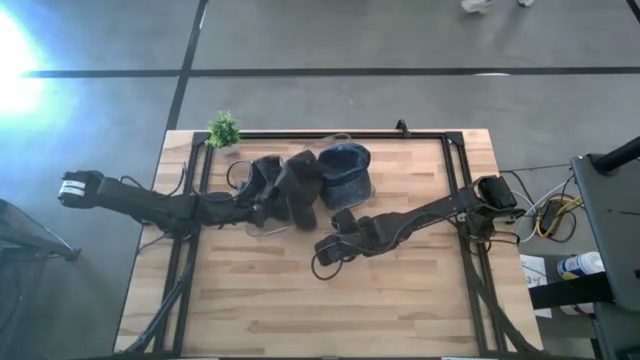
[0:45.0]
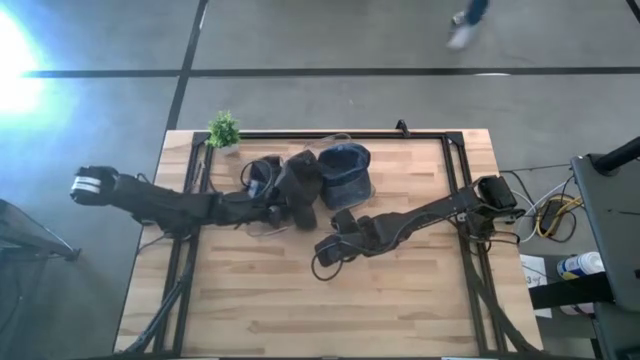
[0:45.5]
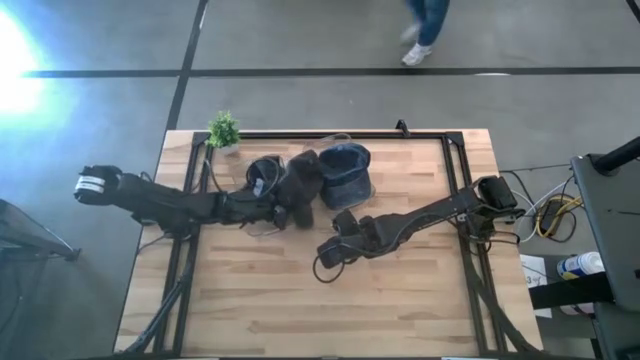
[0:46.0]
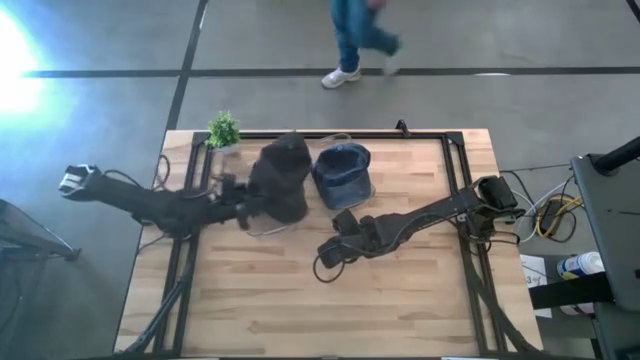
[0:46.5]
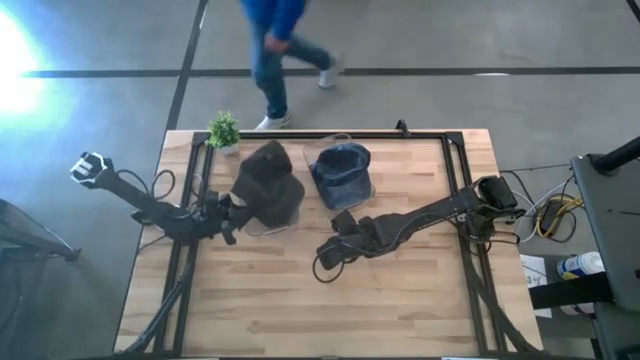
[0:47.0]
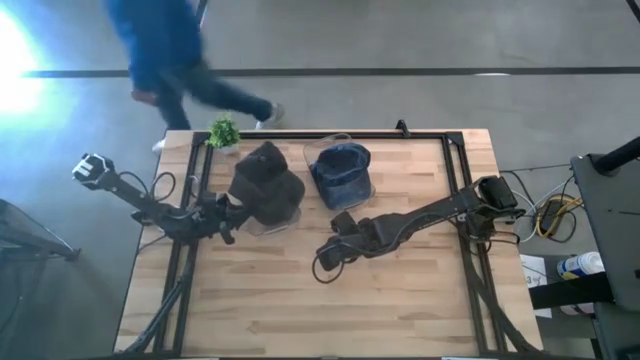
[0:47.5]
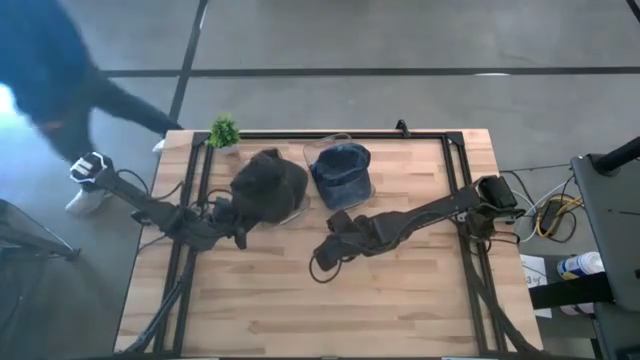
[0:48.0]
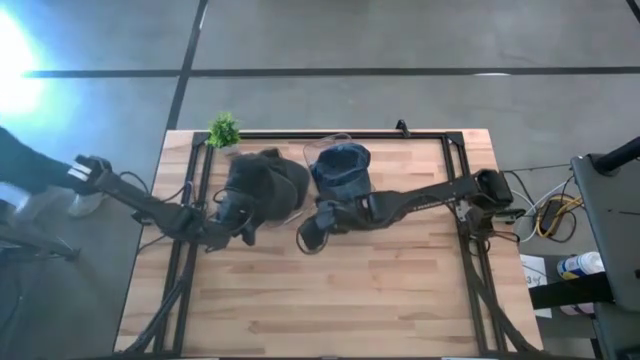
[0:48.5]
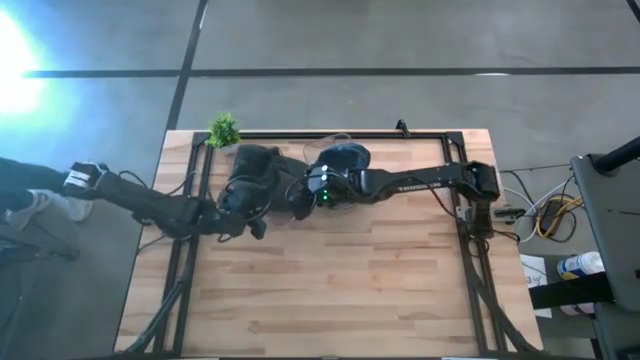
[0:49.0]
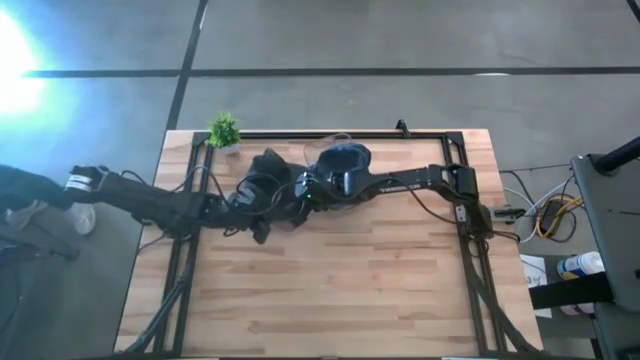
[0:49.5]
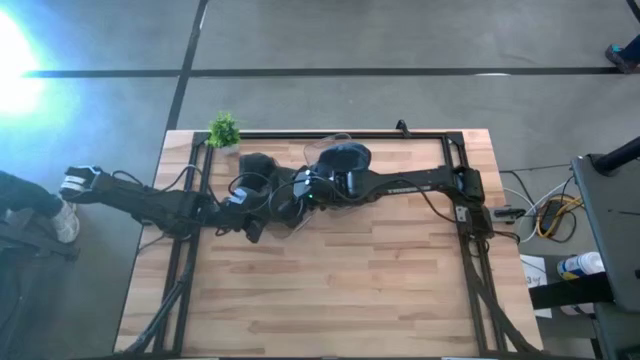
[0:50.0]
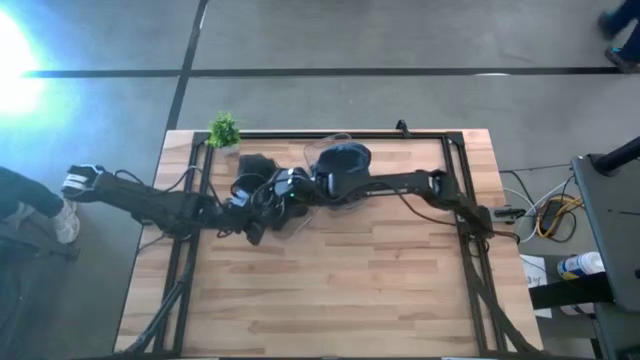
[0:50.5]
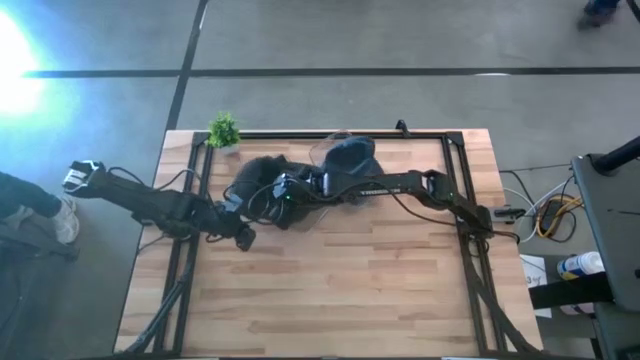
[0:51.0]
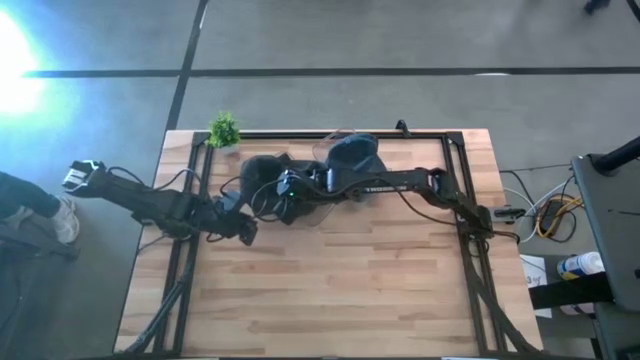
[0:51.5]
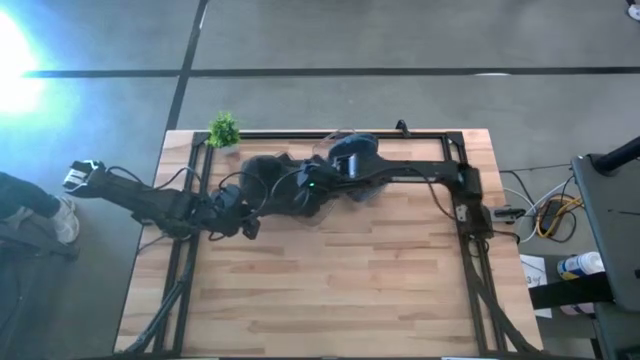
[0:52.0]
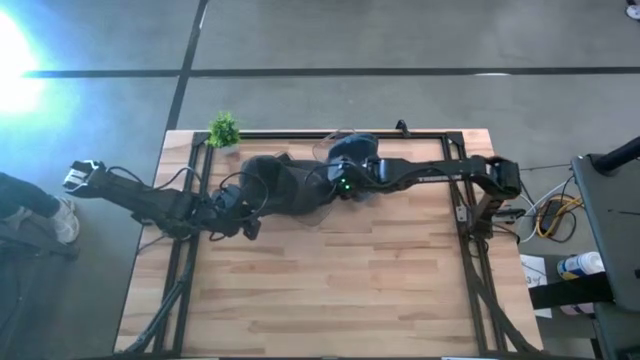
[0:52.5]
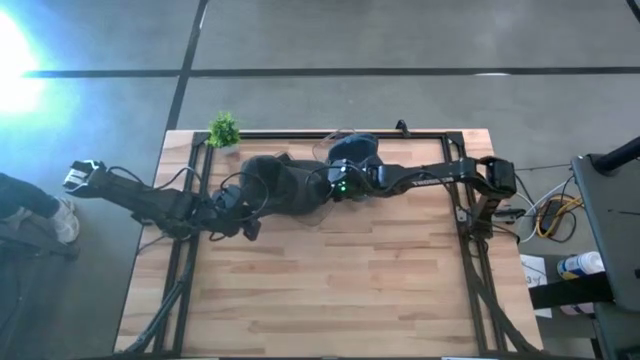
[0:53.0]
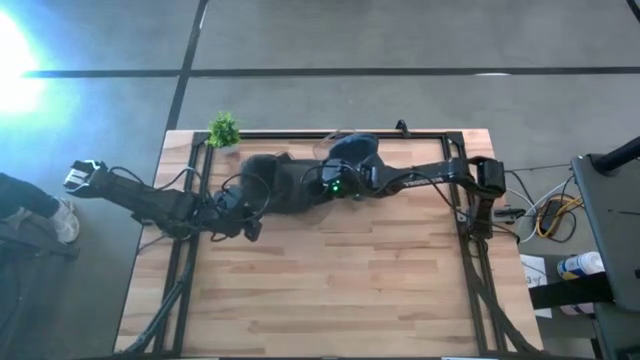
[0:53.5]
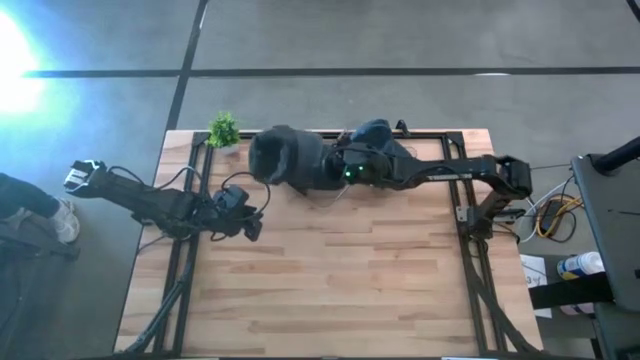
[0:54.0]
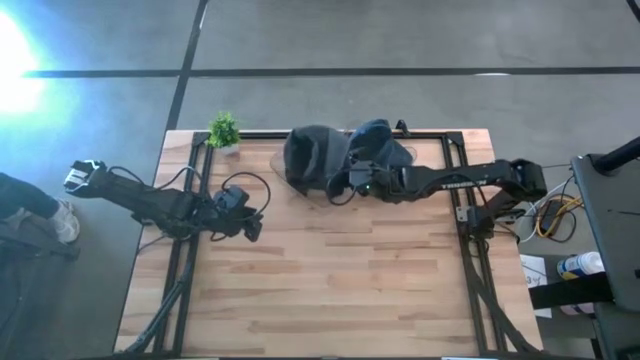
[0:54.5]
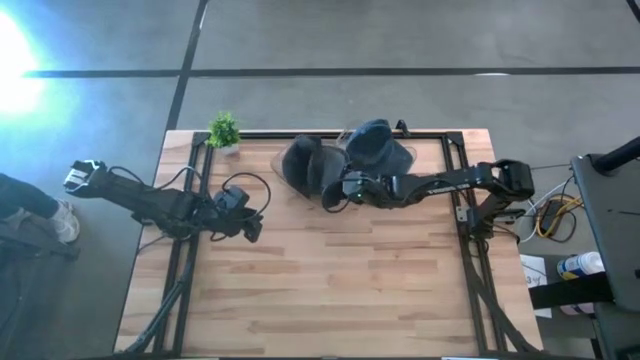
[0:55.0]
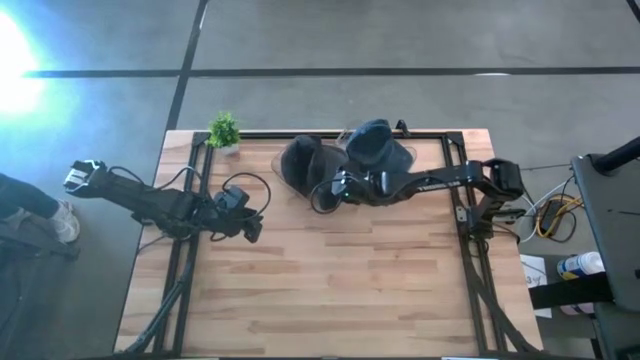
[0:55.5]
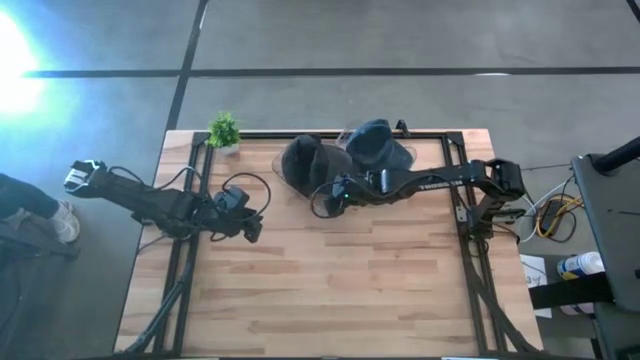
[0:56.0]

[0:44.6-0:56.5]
Task: Pick & Place hat
Put the black cap into the left transparent bin

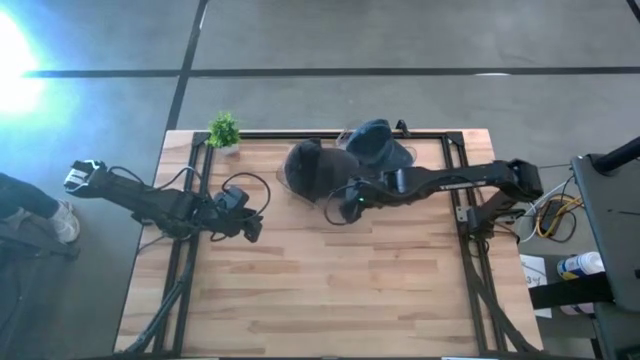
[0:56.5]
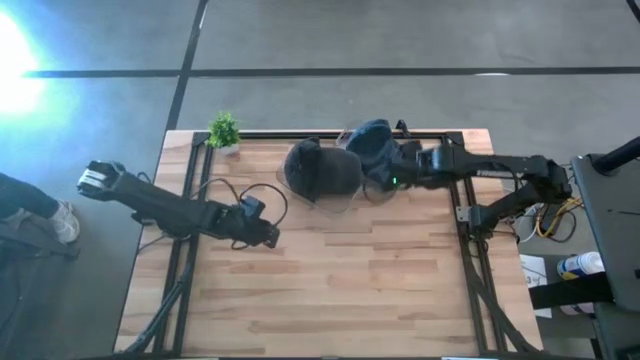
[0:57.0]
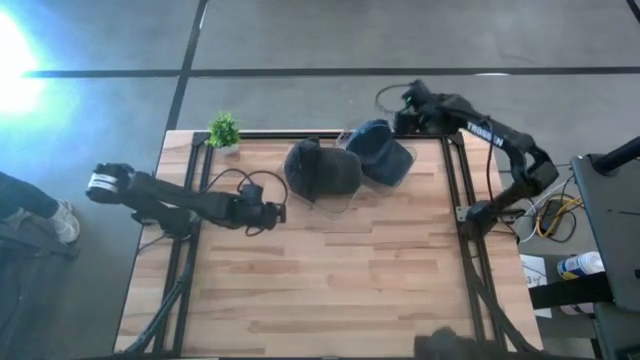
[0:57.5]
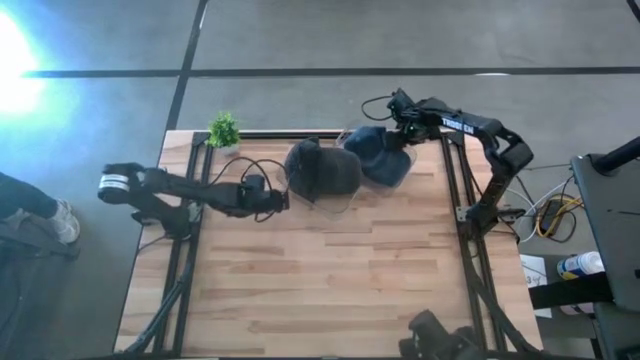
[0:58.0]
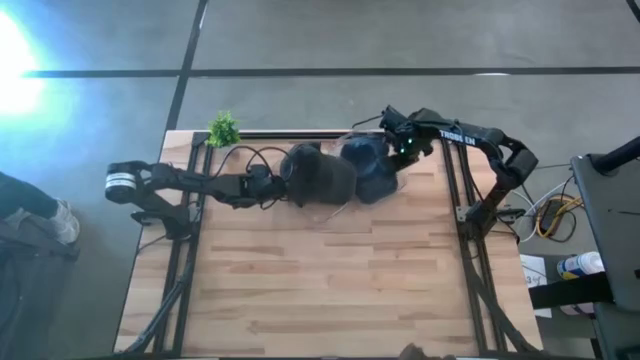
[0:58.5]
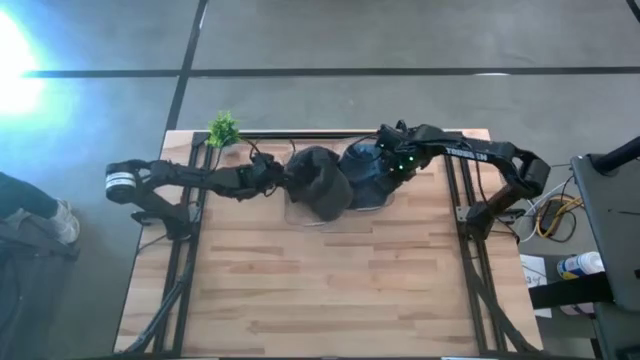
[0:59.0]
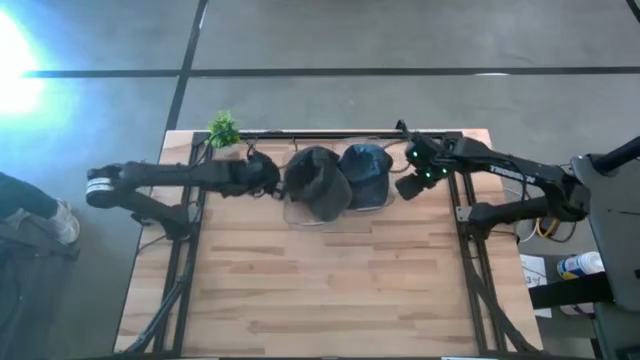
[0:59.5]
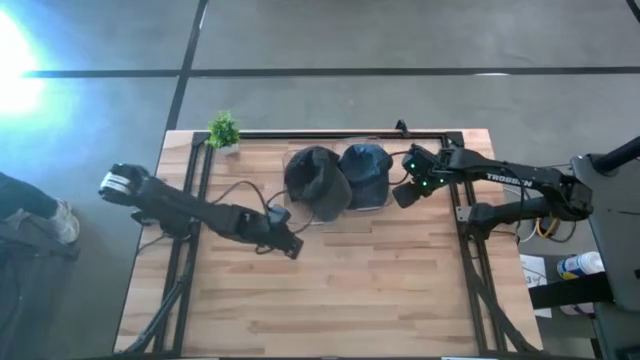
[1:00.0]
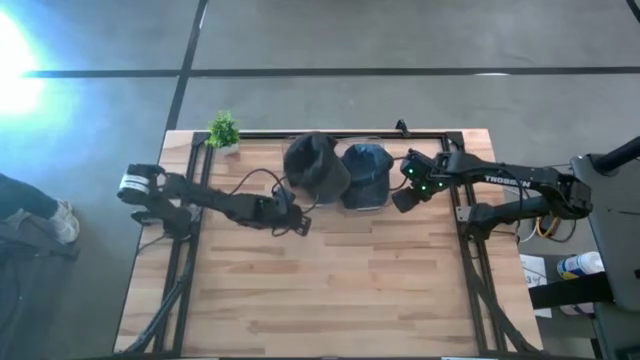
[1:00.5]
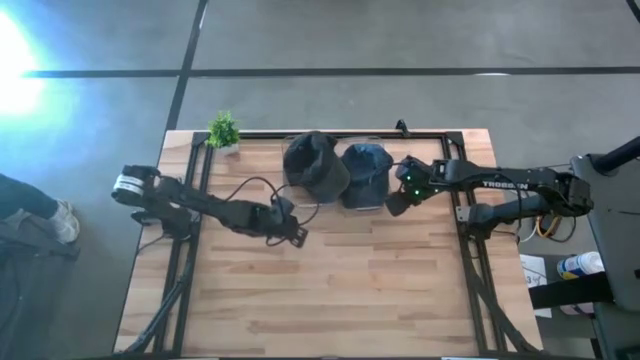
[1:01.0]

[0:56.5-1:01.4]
Adjust the transparent bins

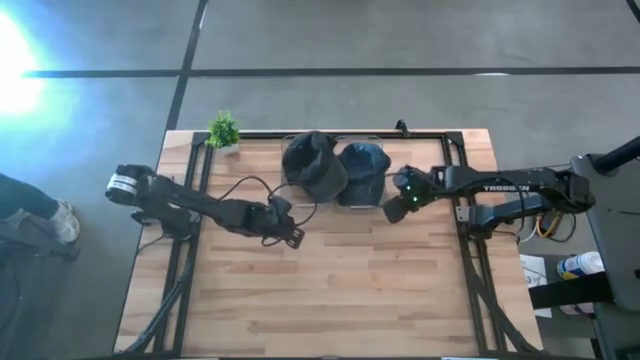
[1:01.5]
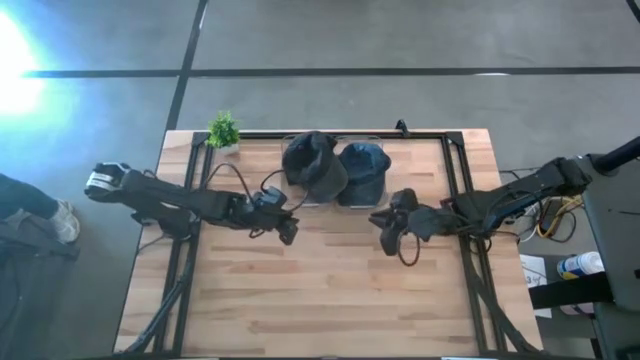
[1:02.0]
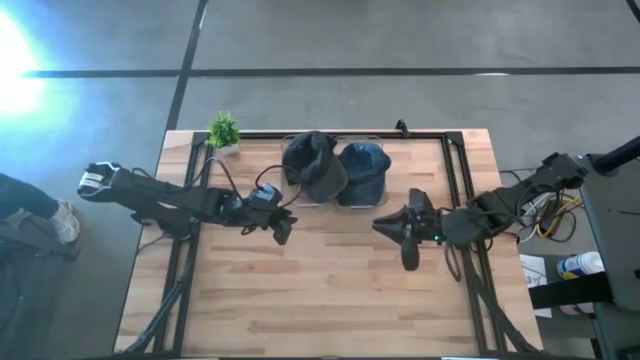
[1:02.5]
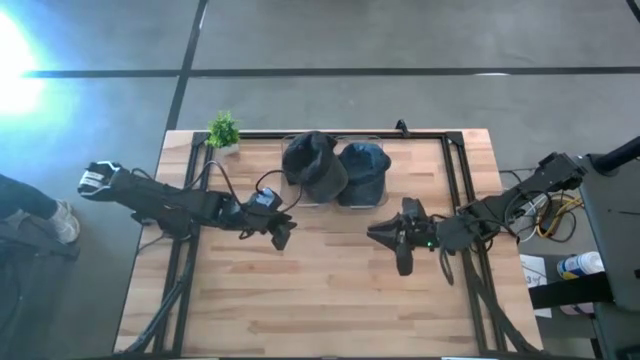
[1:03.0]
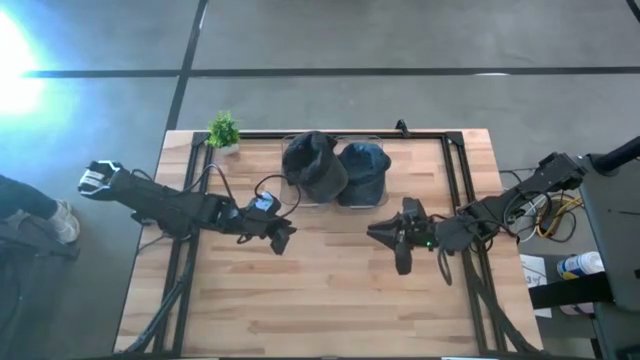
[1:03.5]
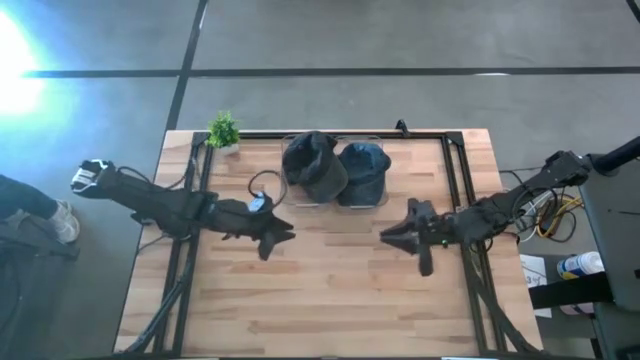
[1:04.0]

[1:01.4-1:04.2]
Return to Home Position

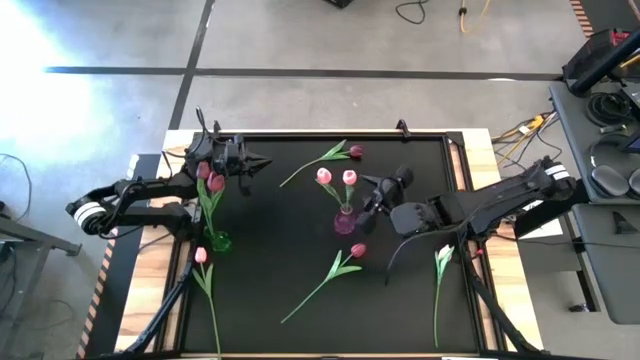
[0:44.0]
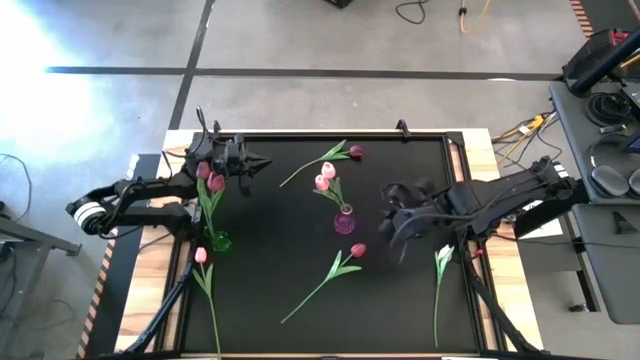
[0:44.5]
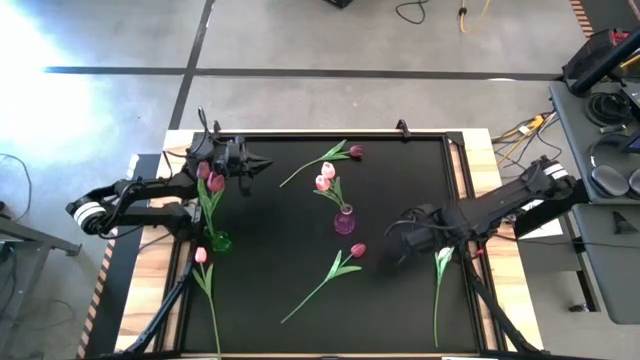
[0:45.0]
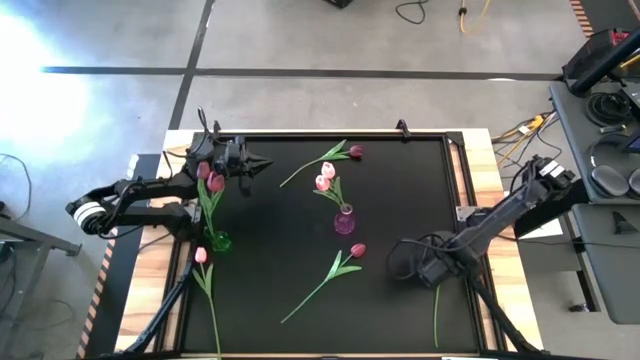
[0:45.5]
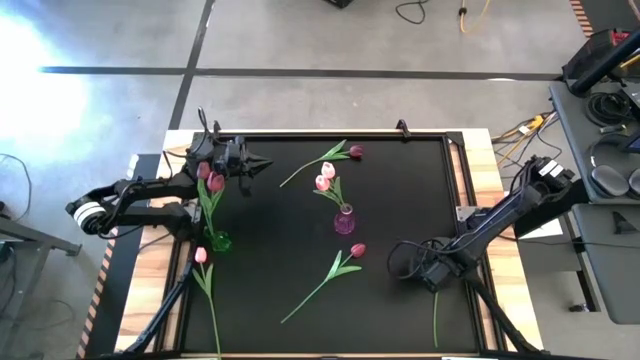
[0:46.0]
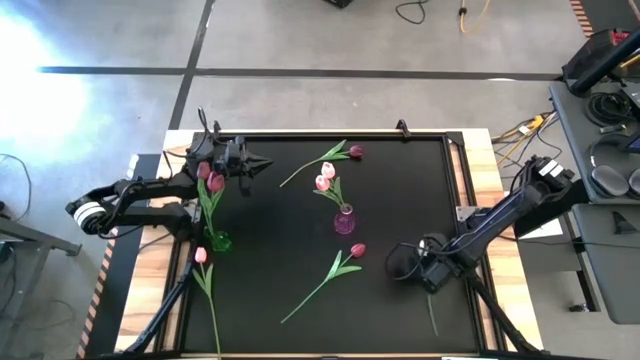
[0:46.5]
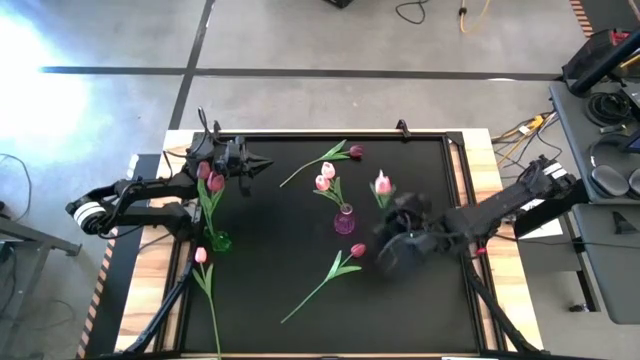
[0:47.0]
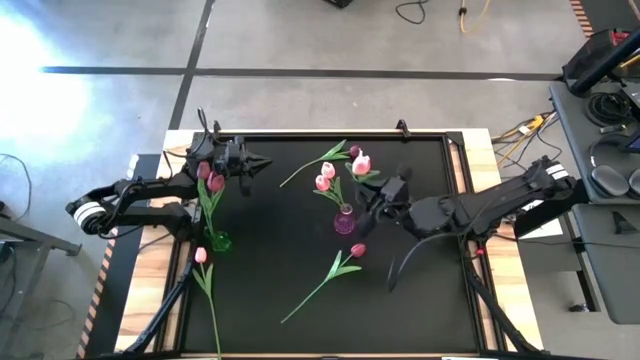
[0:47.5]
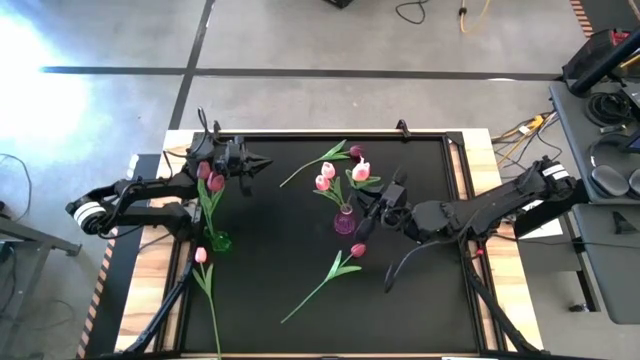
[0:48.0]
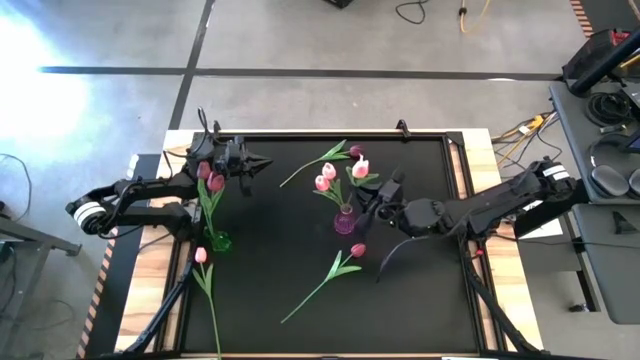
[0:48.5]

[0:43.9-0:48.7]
Task: Sort flowers into vase by color
Put the pink tulip into the purple vase
